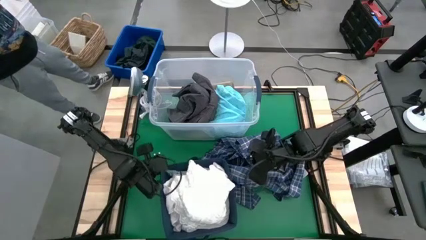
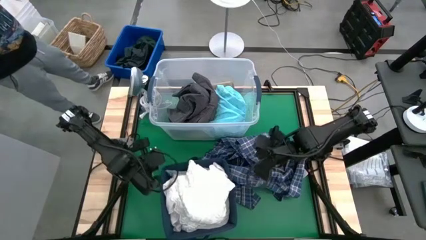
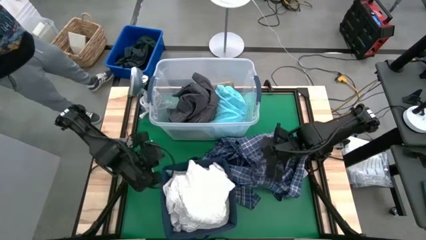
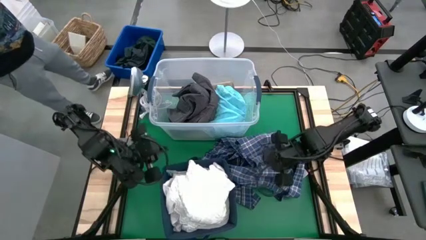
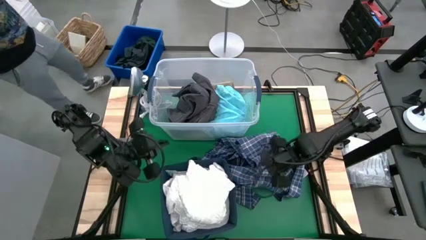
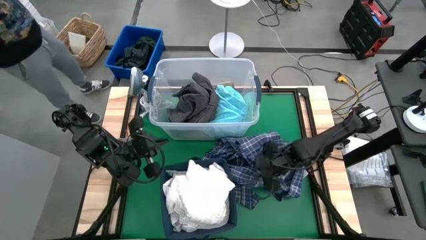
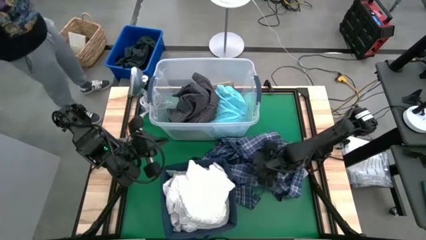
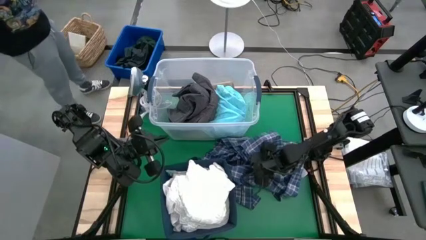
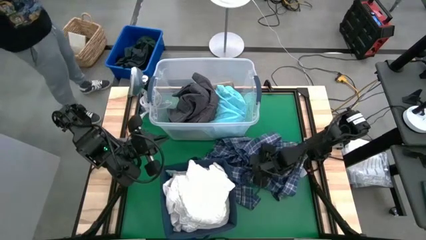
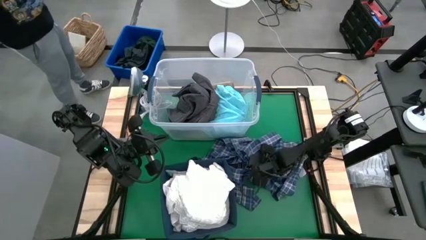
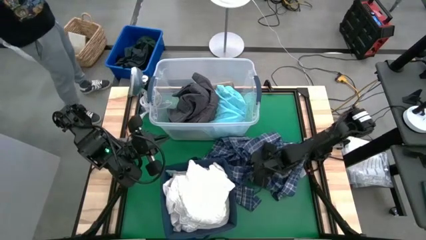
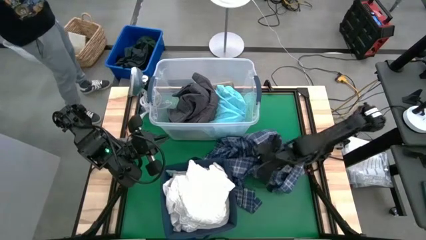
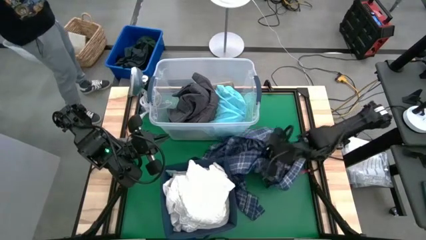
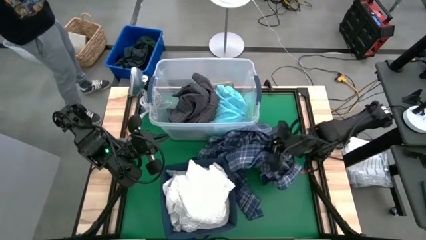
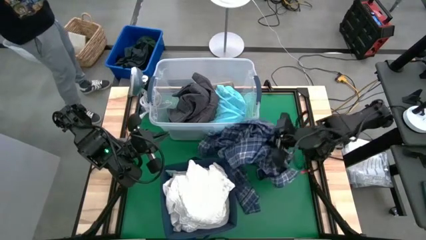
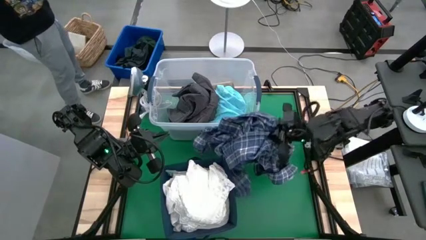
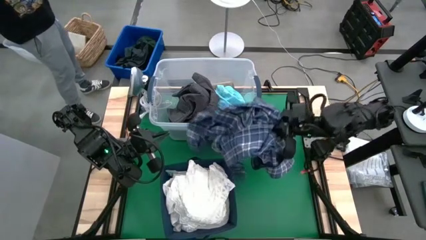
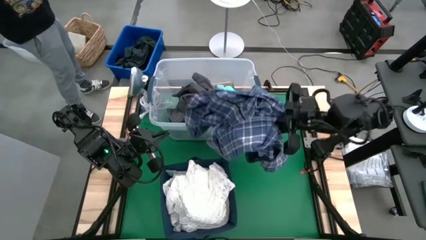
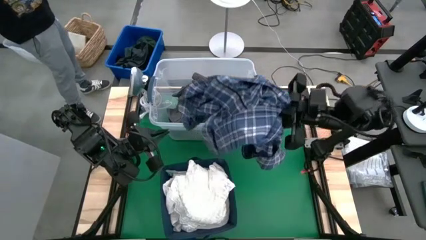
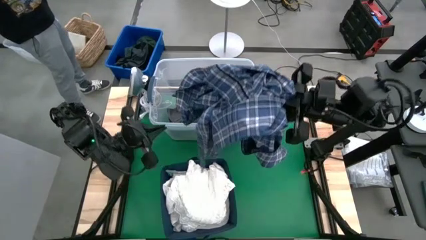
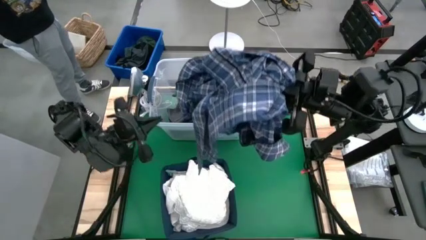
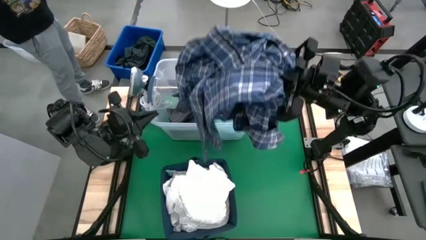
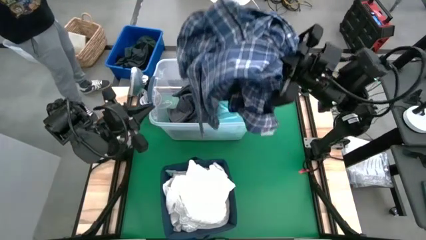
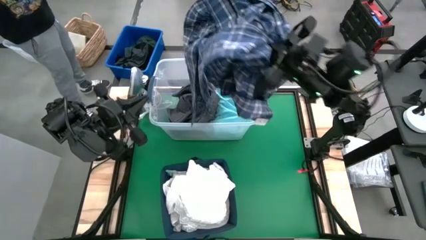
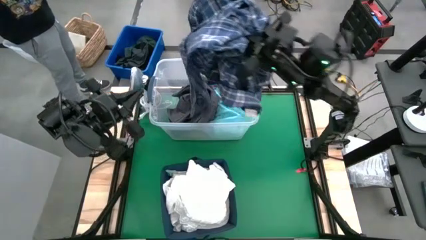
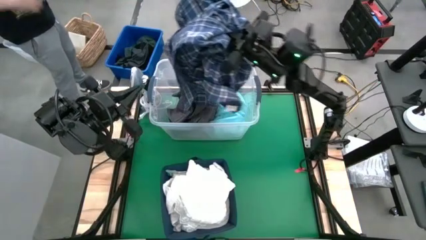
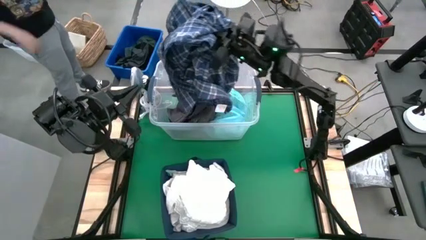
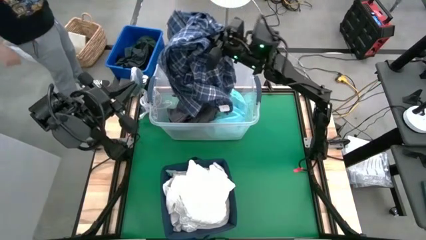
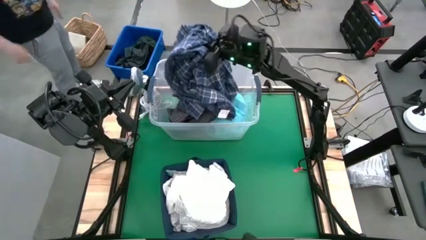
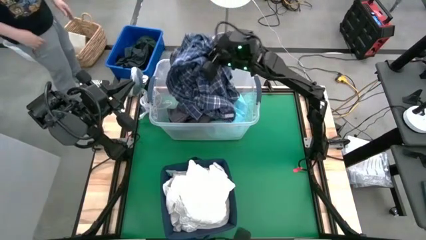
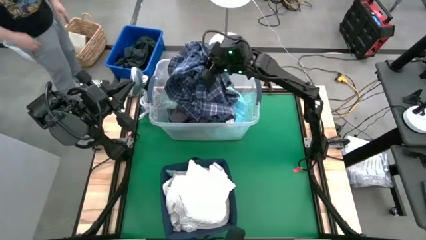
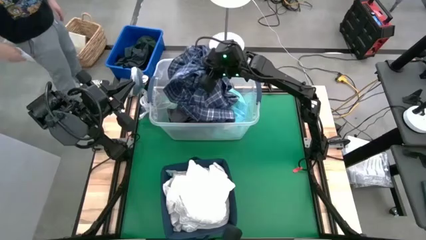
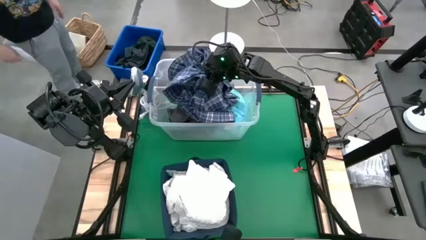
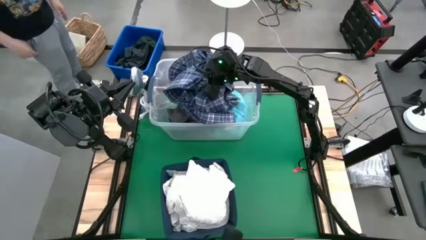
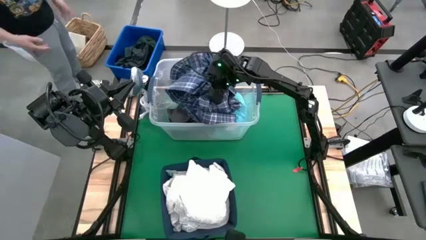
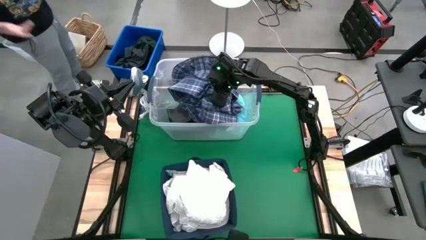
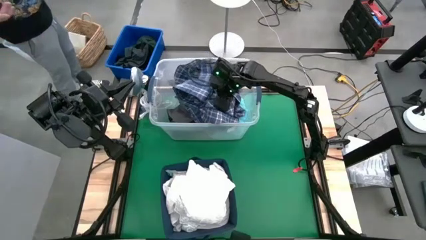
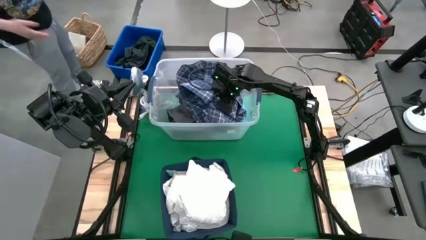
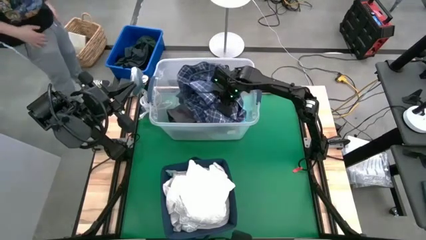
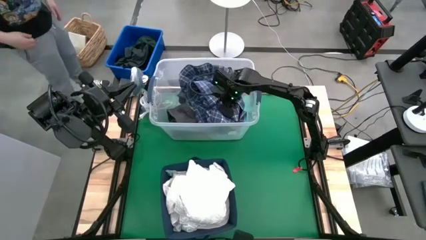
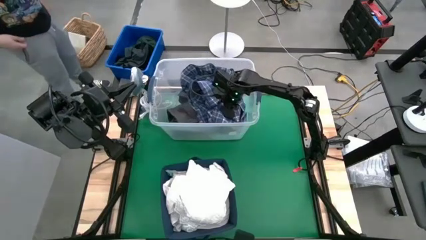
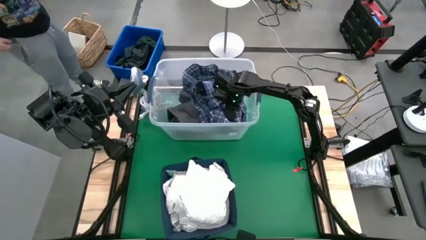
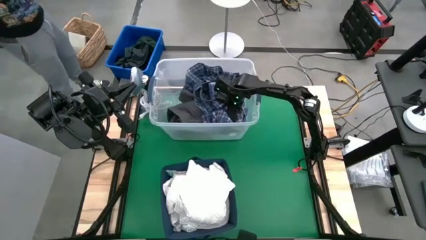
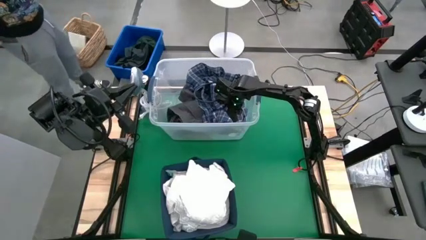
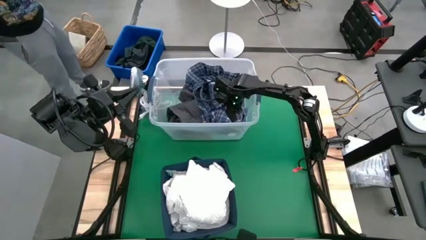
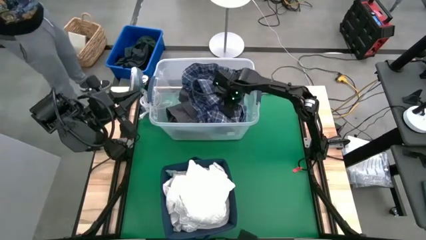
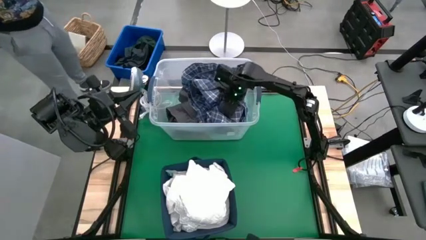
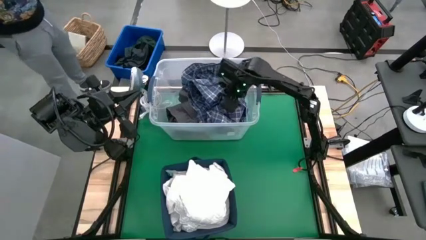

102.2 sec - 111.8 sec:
Task: Sort clothes
Put the blue checkered polo shirts into the transparent laundry bin

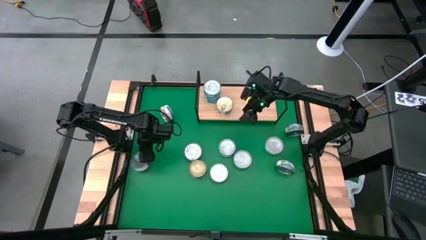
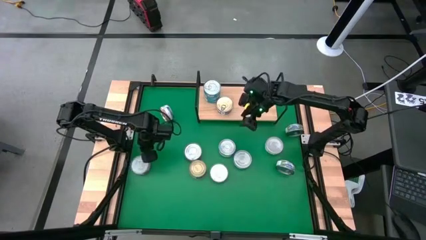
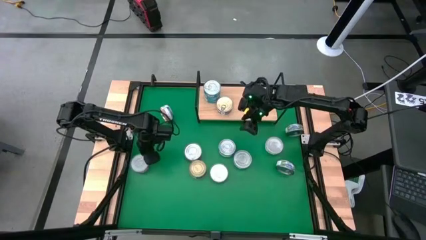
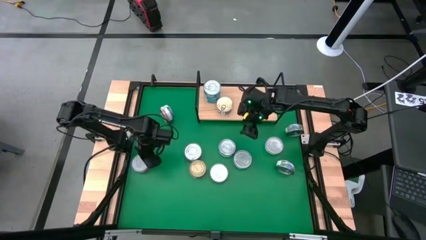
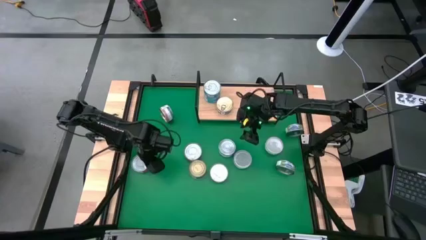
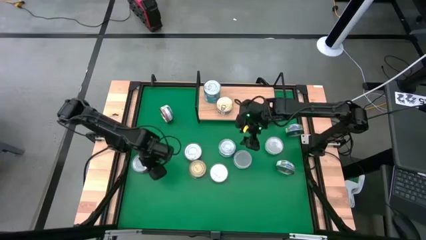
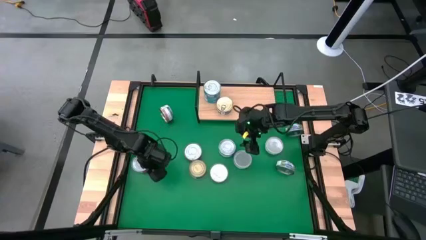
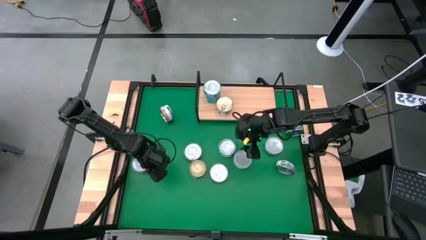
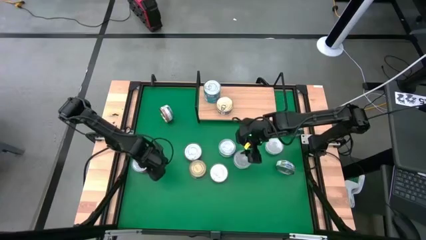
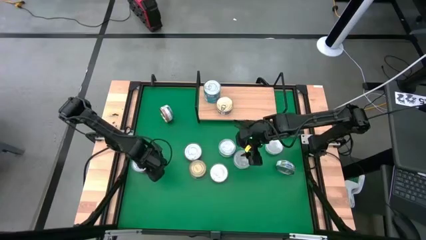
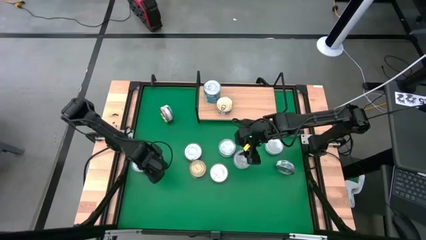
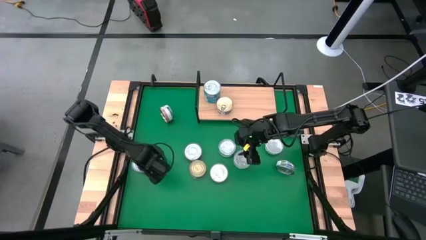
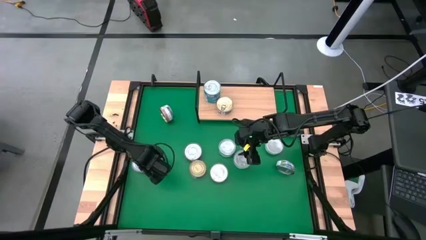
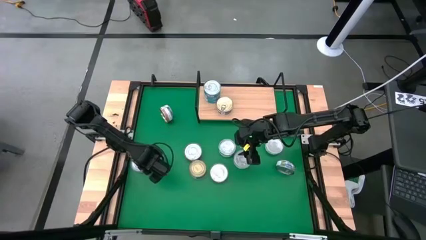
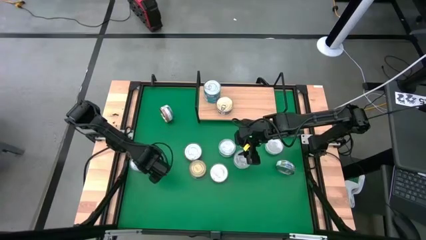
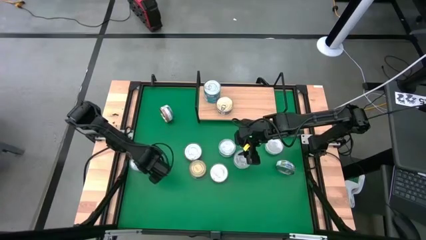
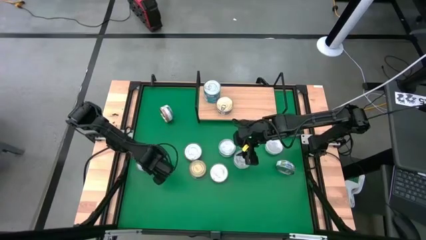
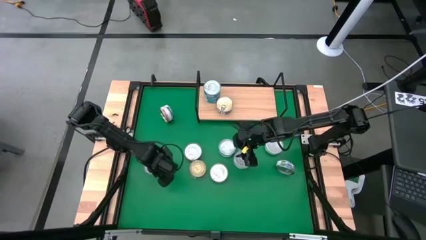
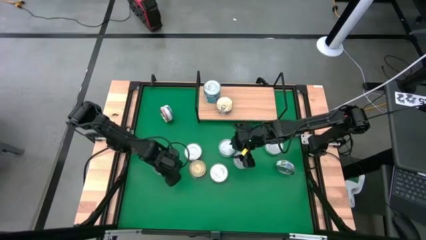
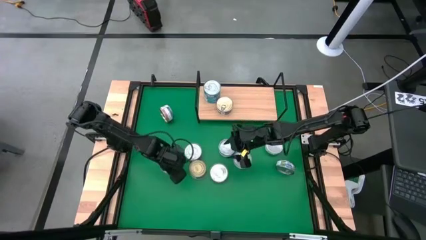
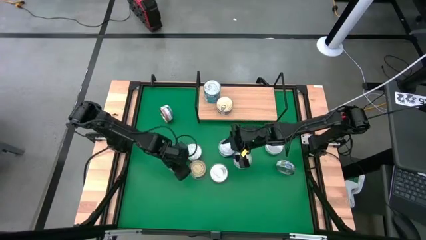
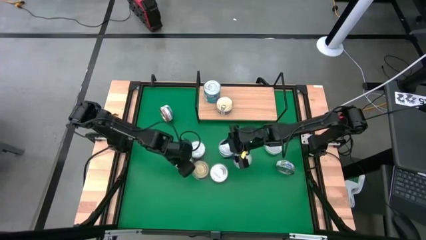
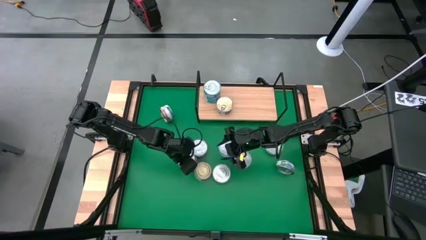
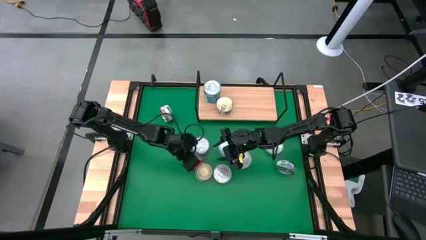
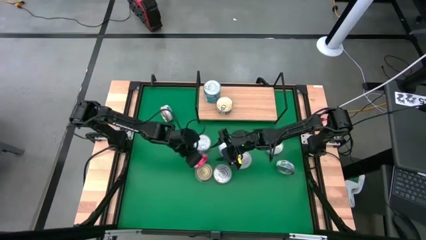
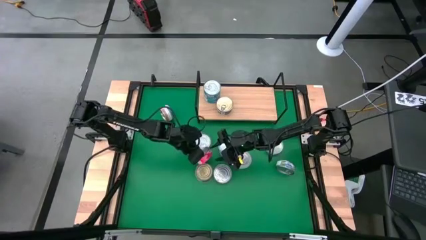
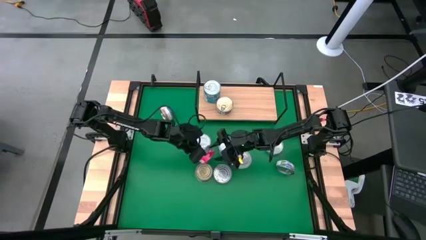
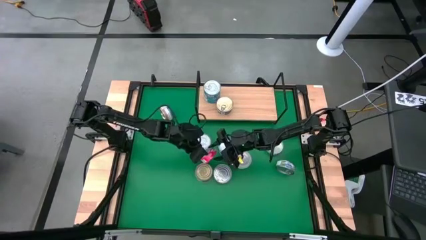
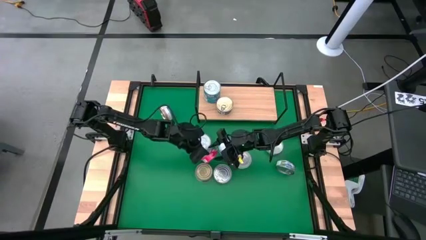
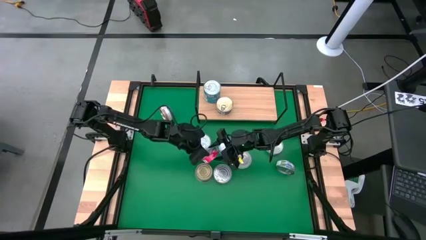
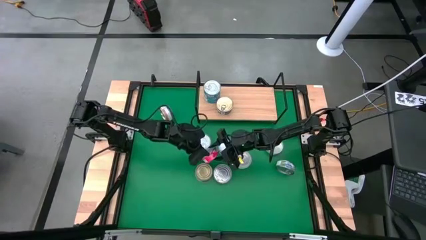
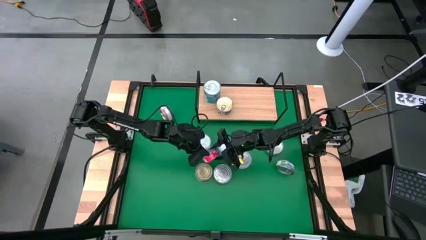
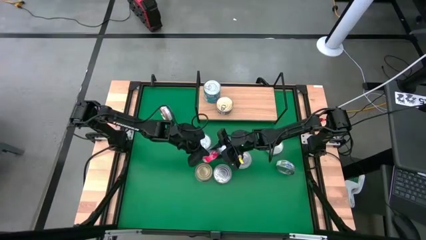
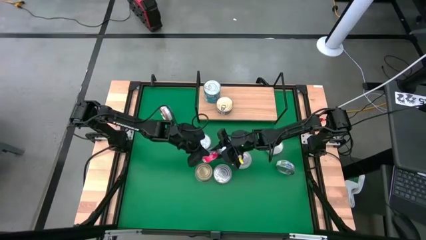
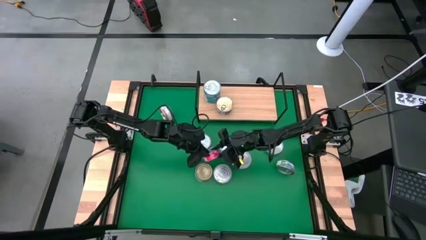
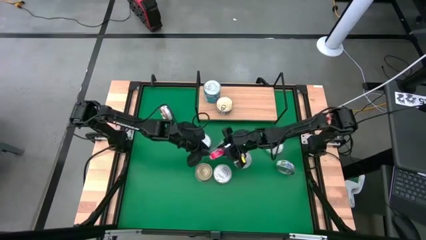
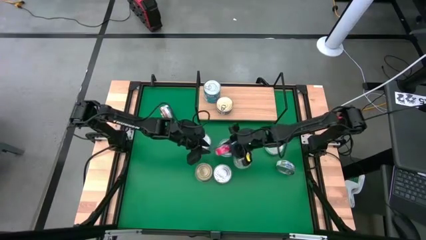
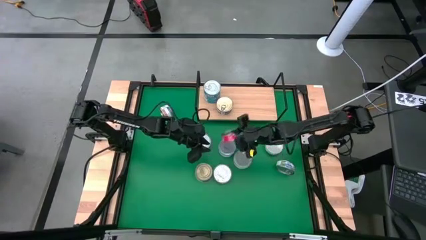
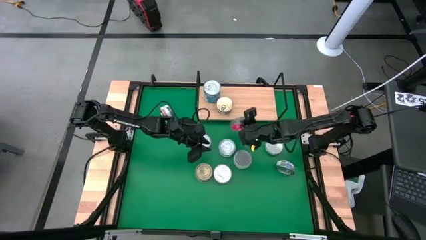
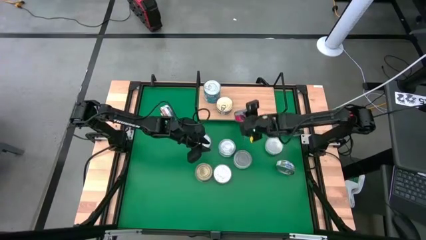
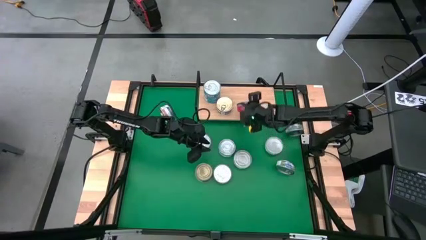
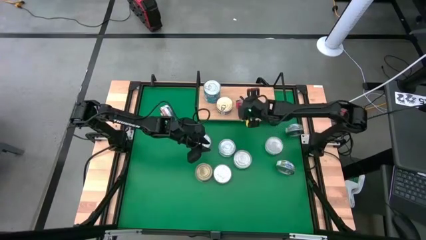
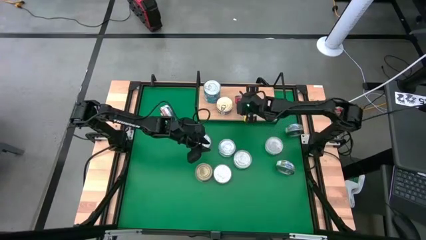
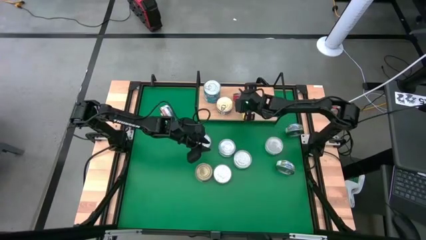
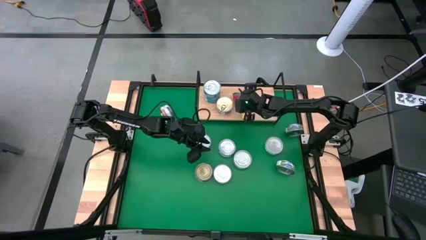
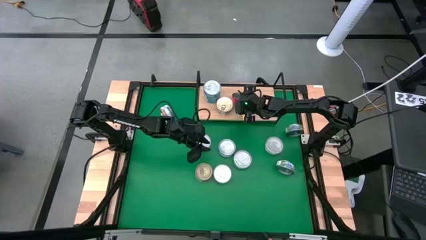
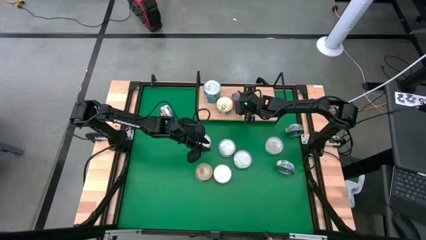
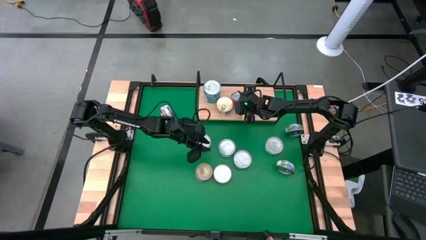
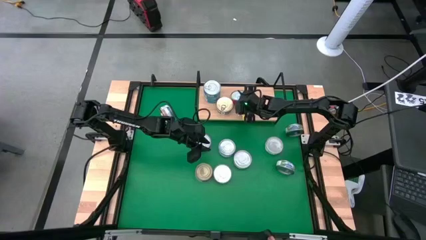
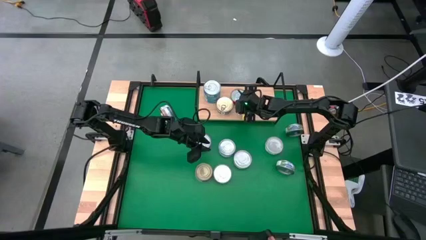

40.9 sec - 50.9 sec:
Task: Stack canned seafood by type on shelf
Put the red tuna can on the shelf
